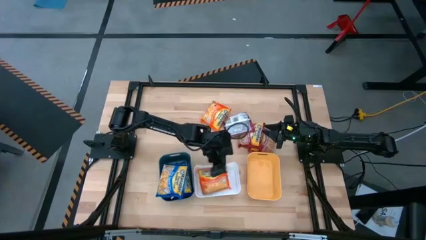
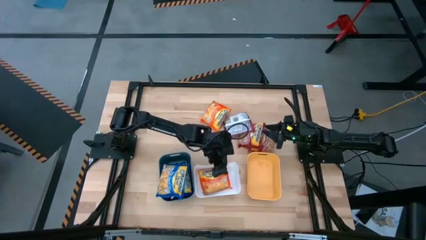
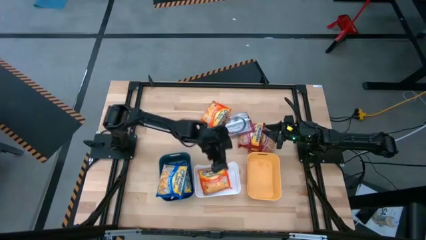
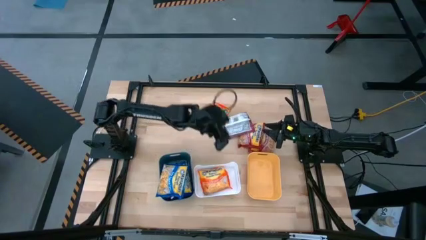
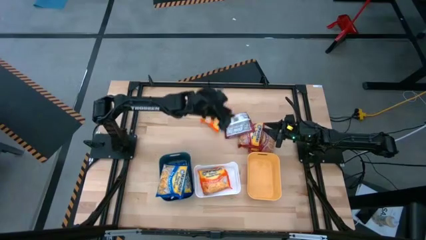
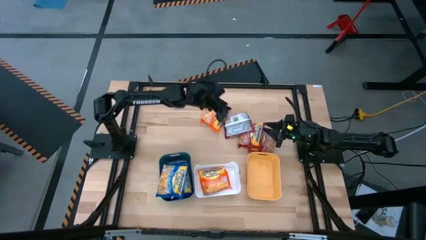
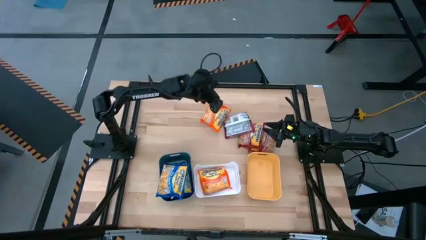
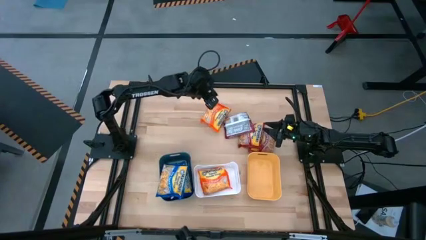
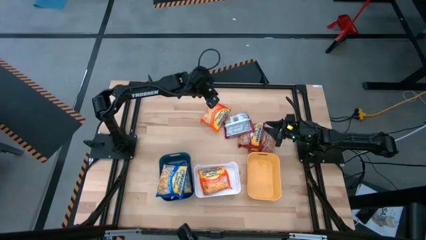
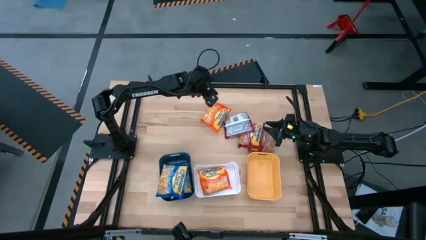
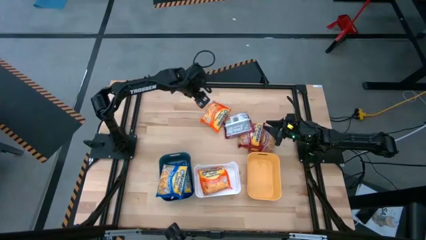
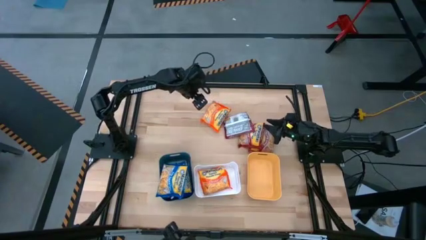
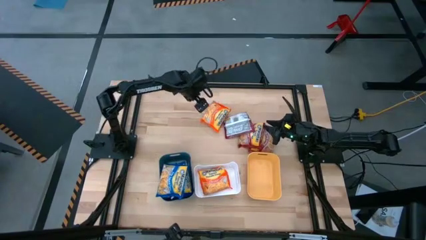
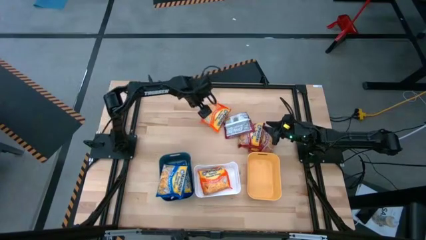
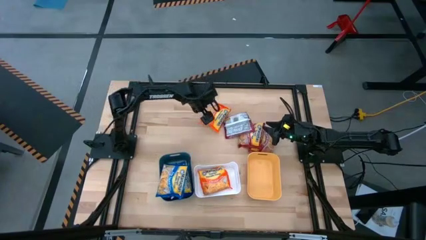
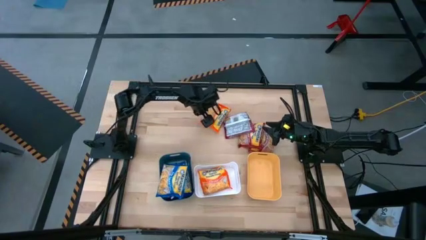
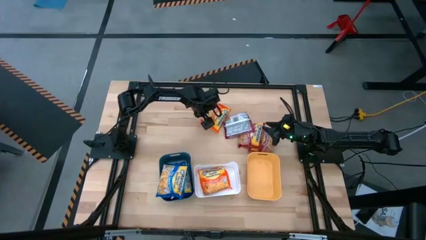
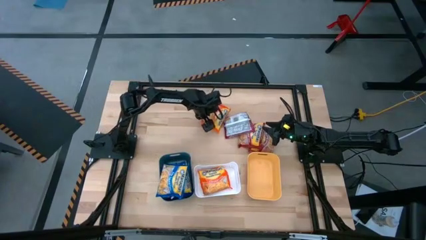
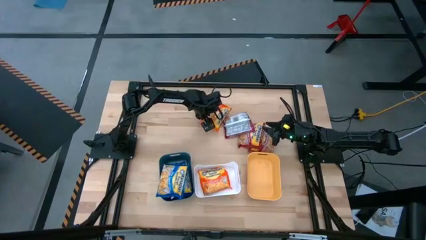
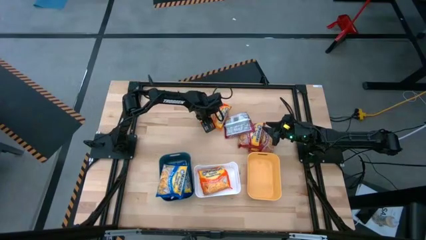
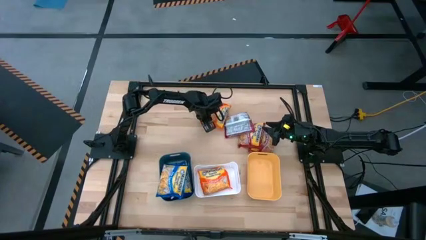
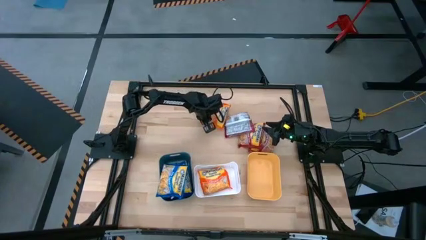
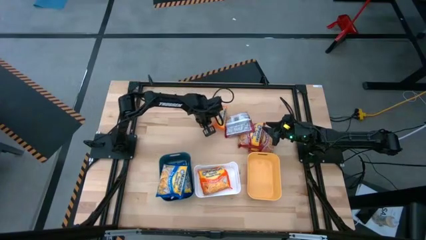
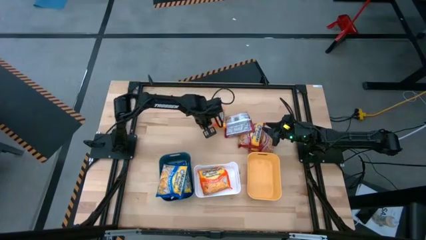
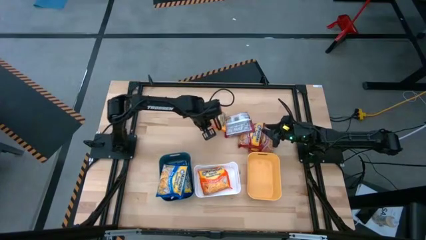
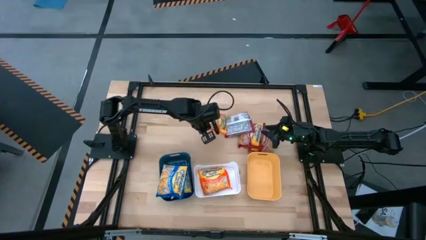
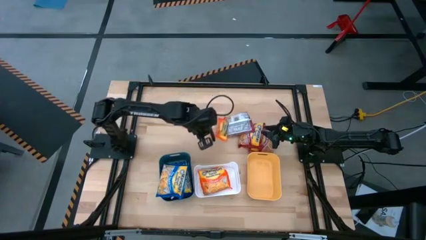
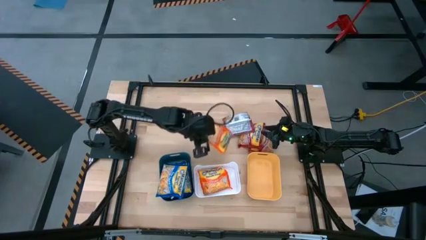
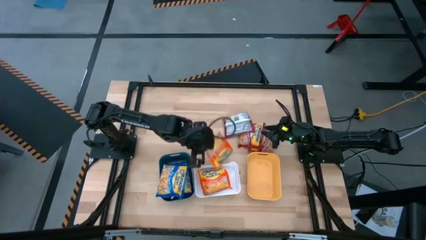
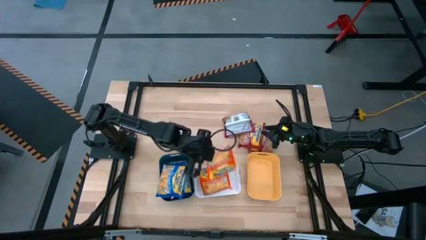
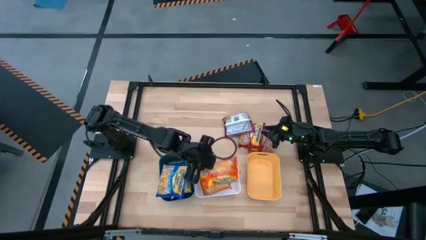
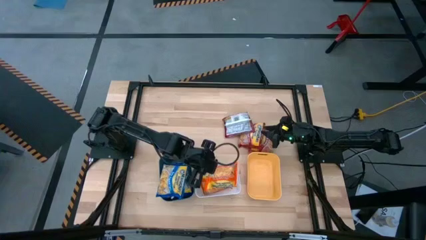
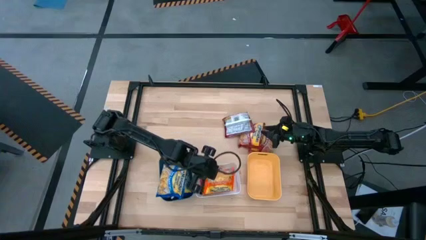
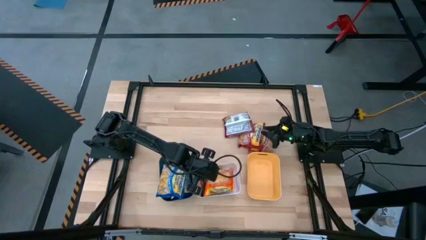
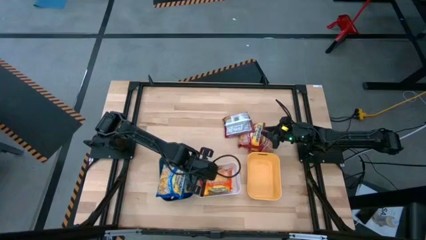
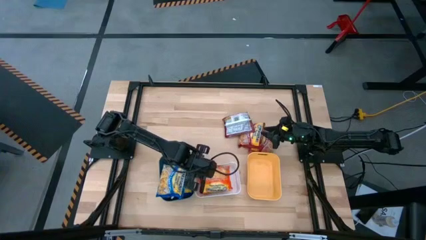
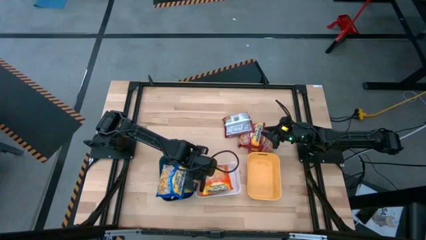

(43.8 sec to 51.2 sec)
Task: Sort Maruchan noodles
Put the orange noodle pack into the white bin

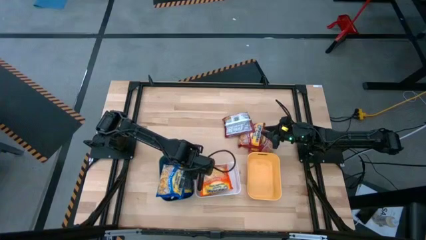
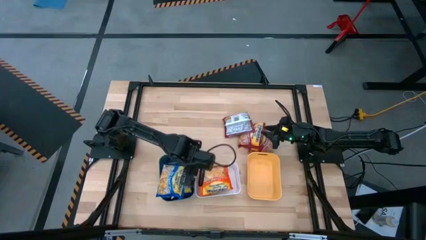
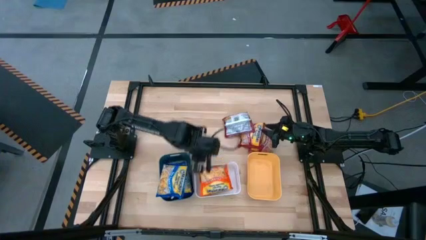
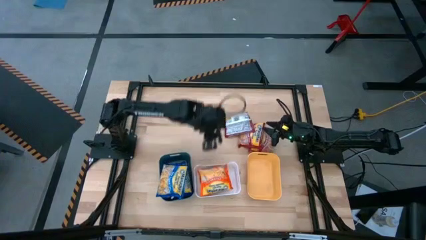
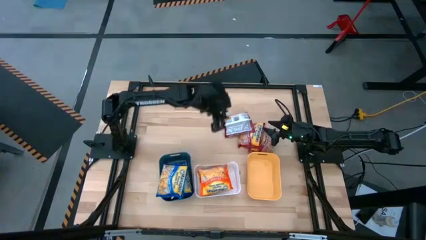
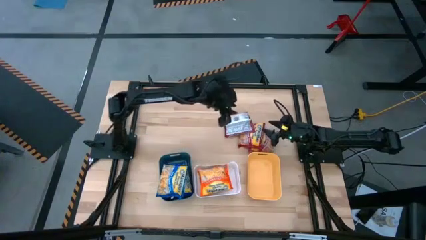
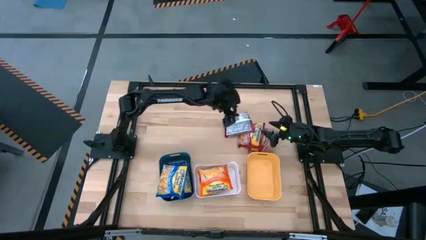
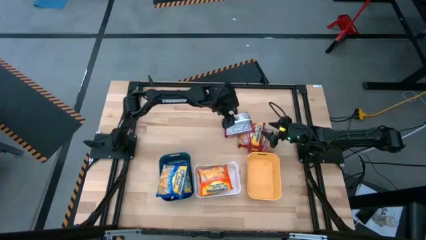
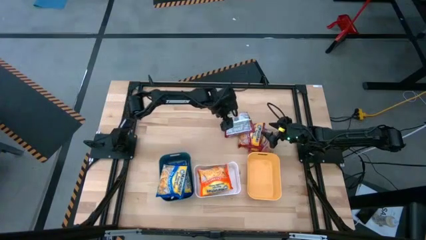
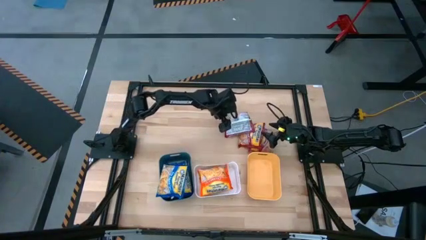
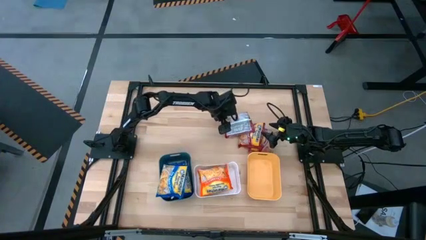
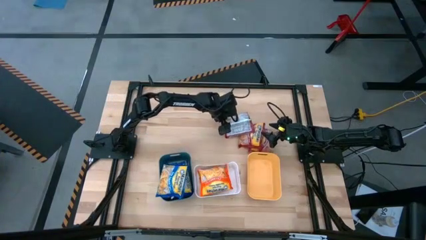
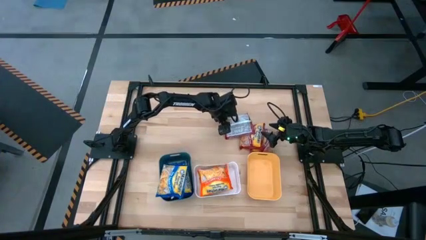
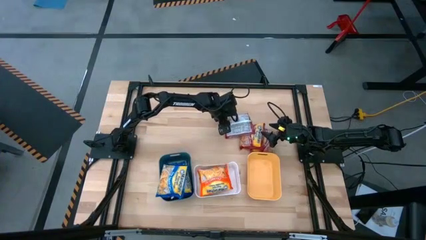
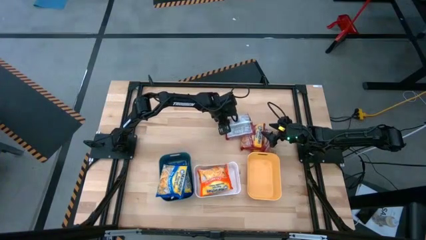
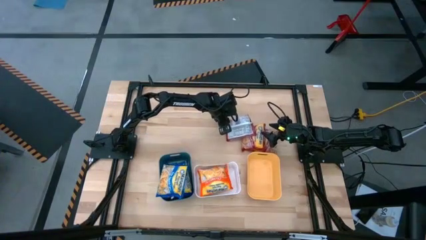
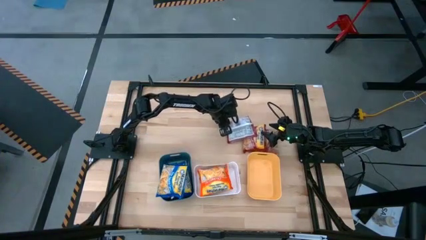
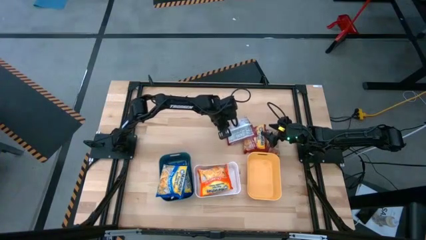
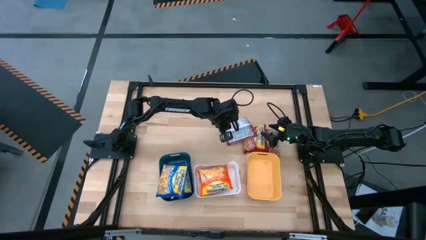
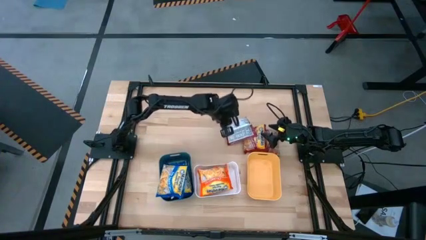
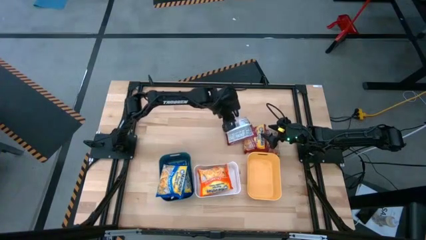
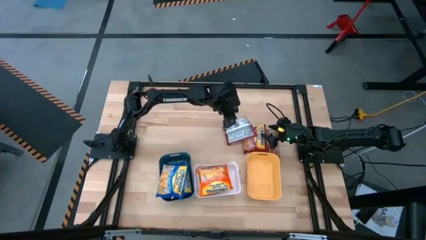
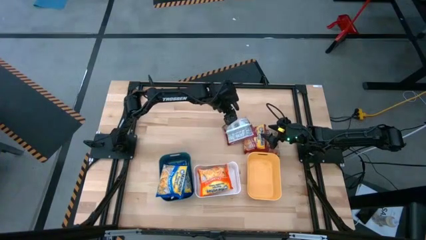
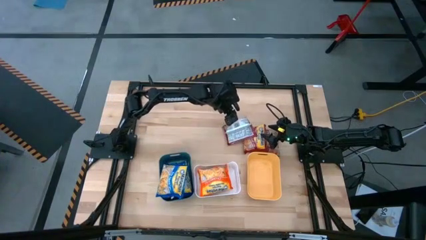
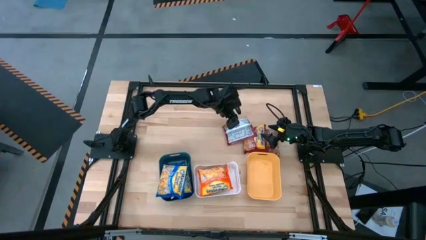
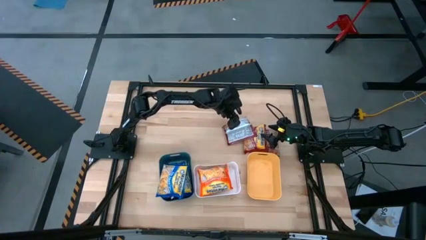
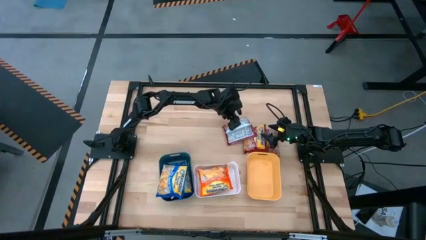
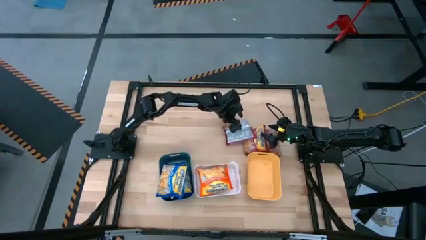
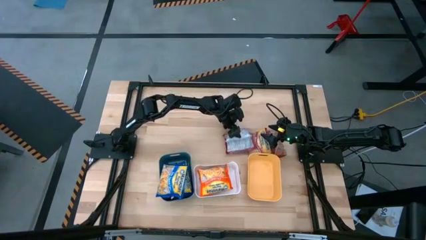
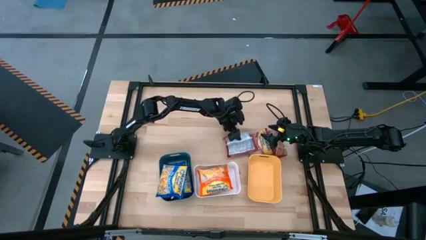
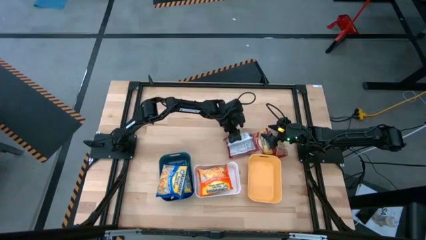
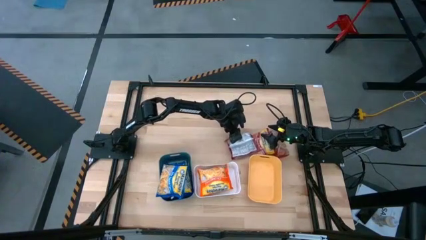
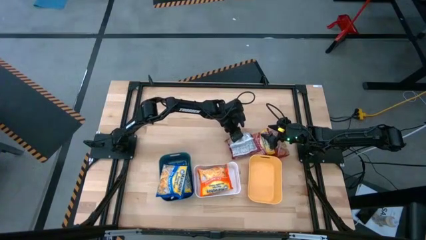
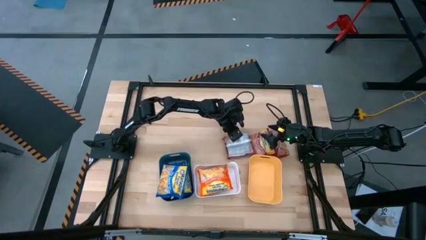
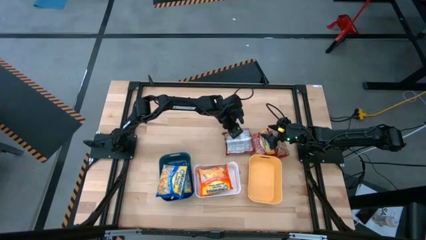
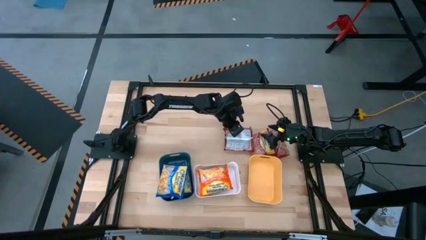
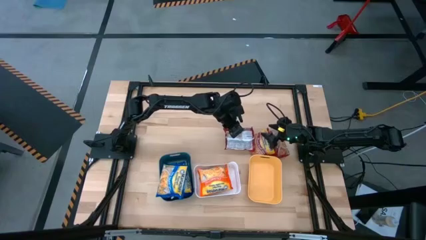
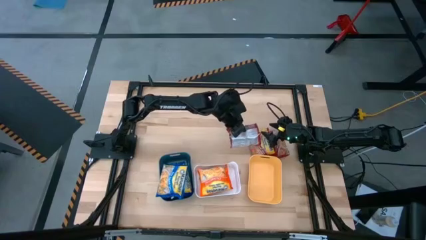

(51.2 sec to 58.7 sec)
Put the left red noodle pack into the yellow bin

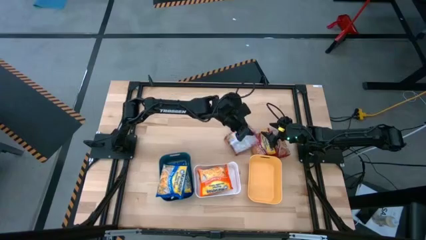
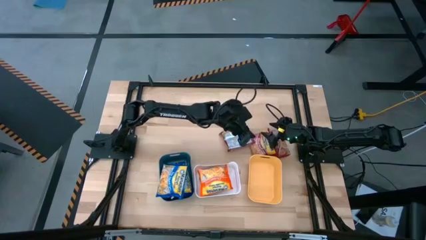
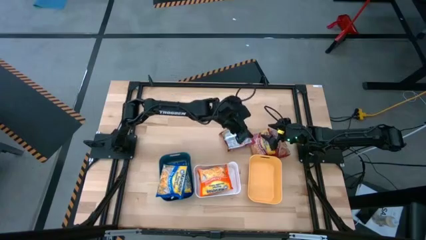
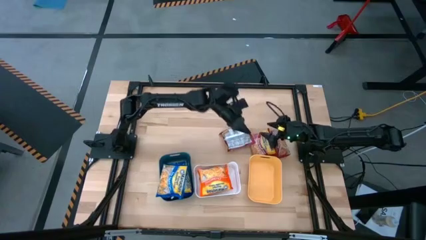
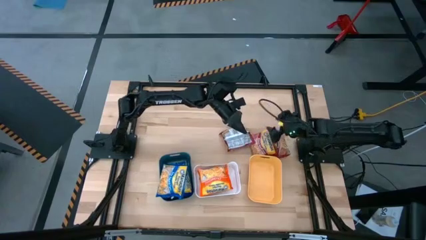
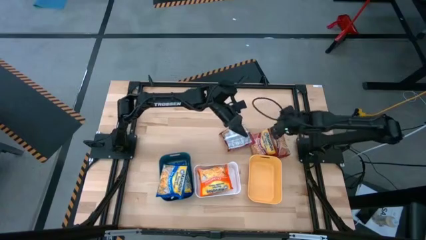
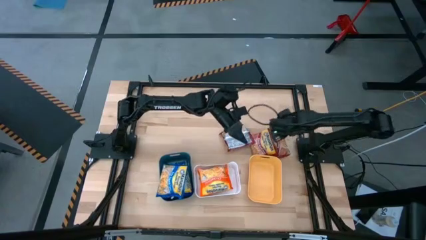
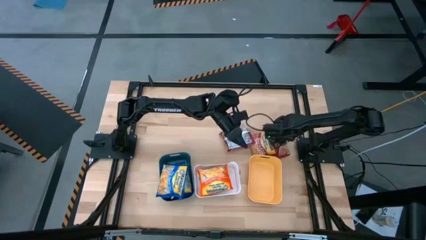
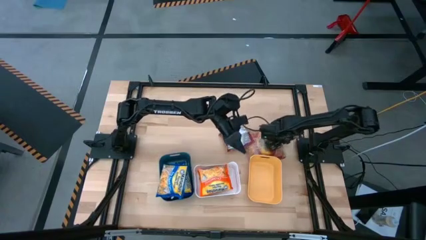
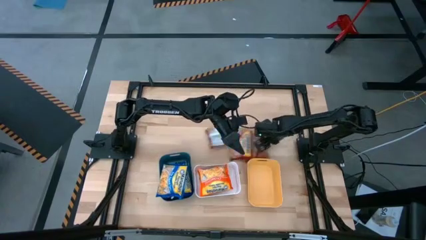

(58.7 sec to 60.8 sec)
Move the red noodle packs to the center of the table
